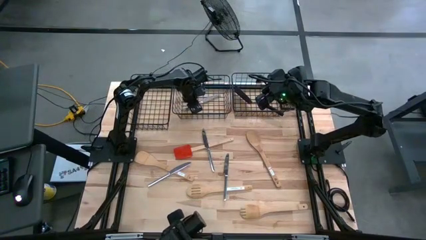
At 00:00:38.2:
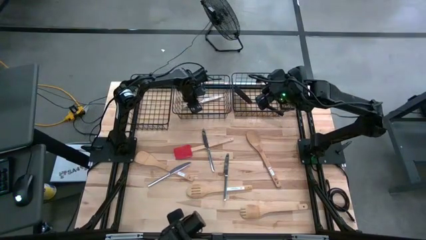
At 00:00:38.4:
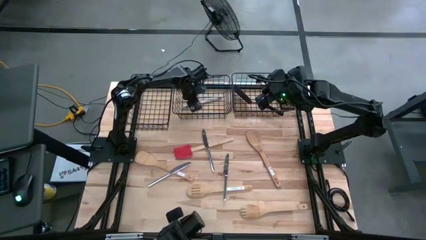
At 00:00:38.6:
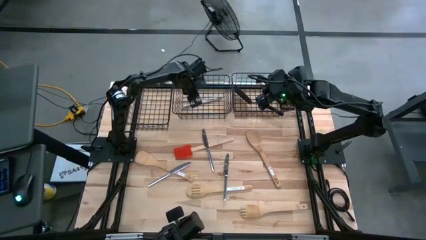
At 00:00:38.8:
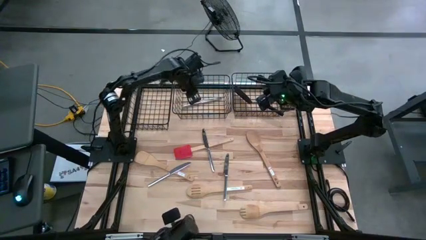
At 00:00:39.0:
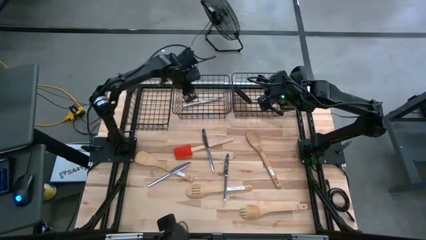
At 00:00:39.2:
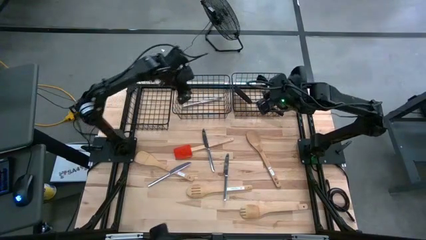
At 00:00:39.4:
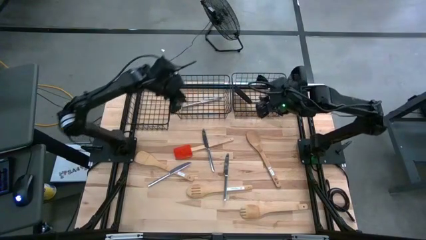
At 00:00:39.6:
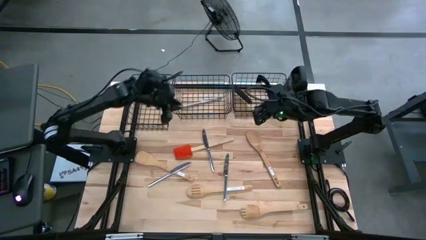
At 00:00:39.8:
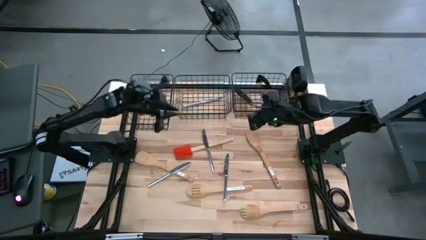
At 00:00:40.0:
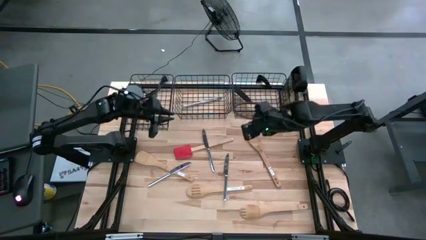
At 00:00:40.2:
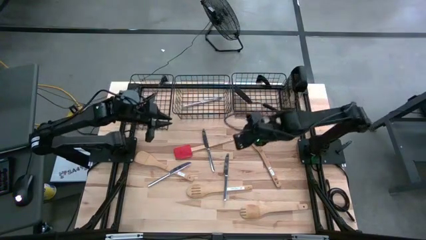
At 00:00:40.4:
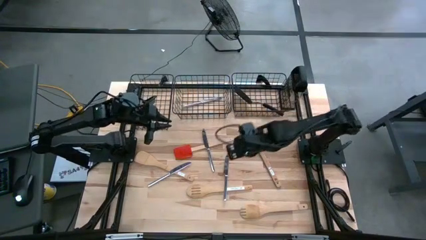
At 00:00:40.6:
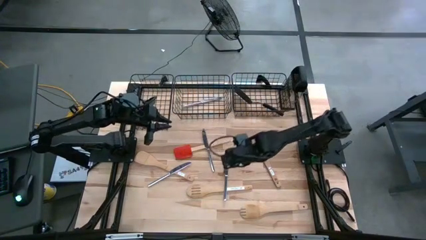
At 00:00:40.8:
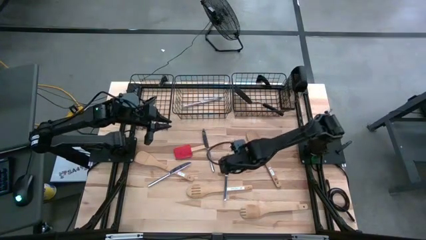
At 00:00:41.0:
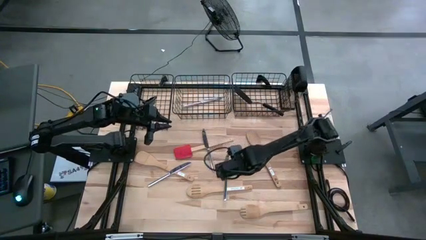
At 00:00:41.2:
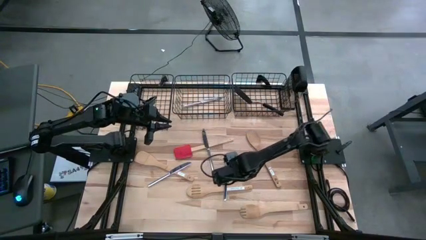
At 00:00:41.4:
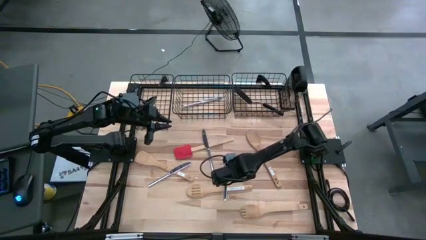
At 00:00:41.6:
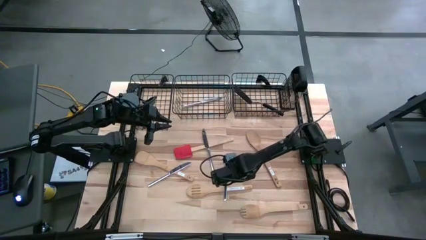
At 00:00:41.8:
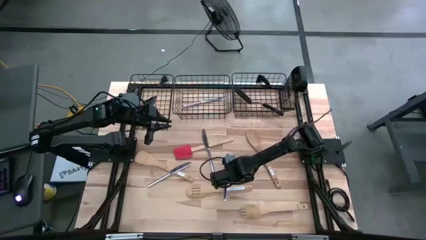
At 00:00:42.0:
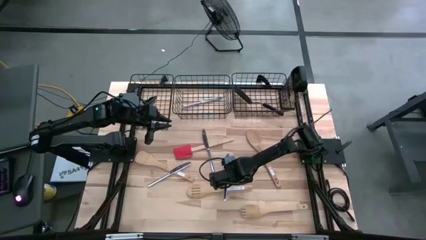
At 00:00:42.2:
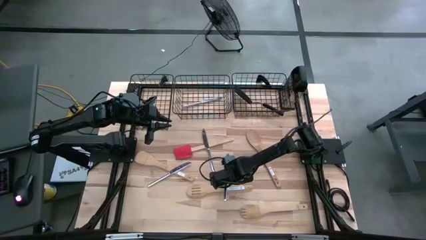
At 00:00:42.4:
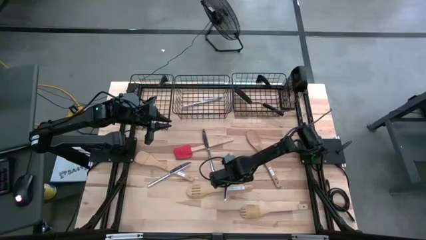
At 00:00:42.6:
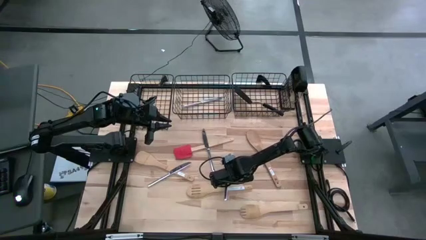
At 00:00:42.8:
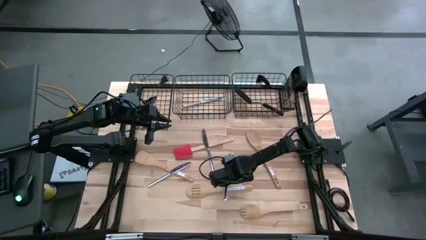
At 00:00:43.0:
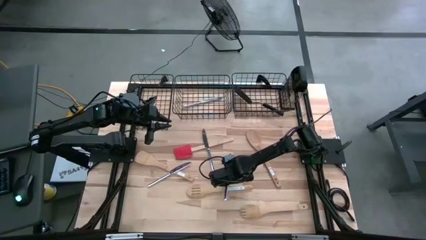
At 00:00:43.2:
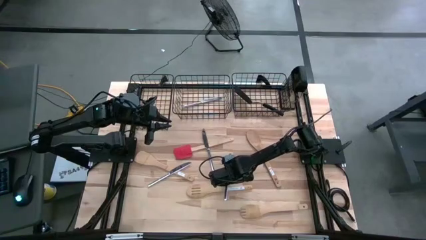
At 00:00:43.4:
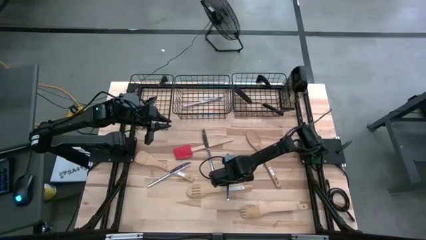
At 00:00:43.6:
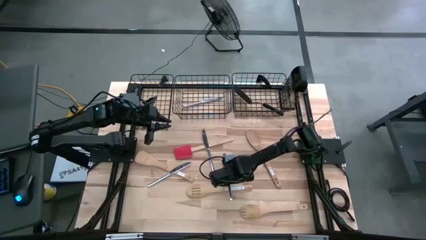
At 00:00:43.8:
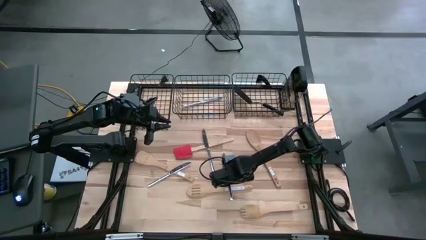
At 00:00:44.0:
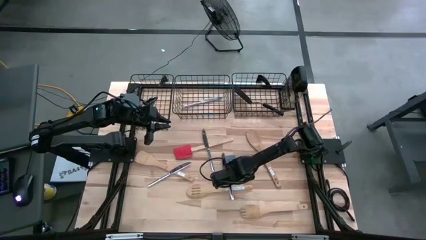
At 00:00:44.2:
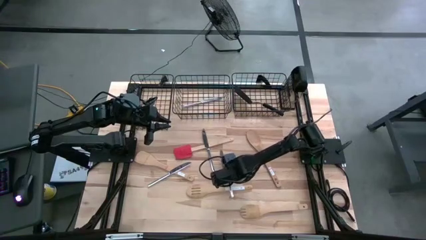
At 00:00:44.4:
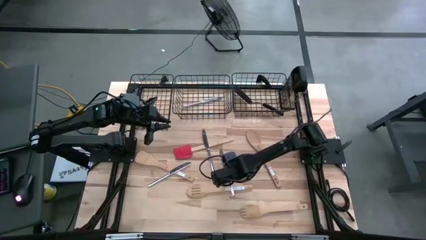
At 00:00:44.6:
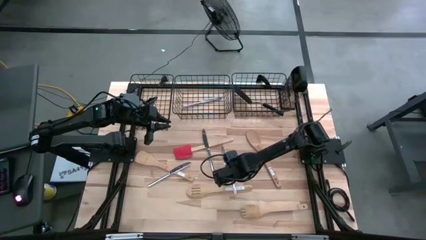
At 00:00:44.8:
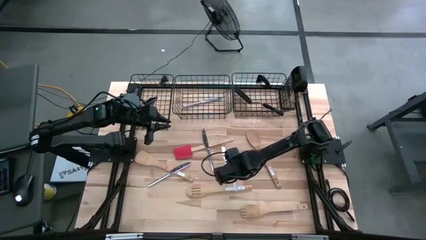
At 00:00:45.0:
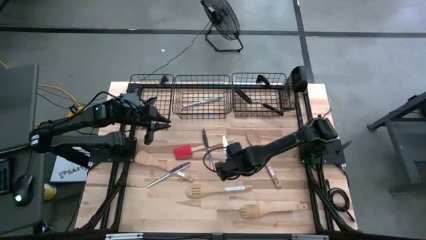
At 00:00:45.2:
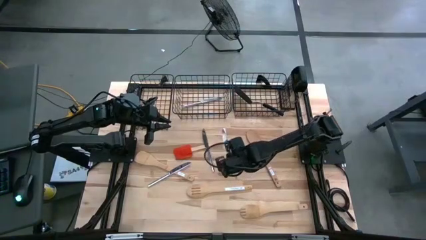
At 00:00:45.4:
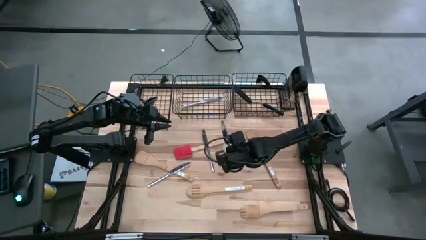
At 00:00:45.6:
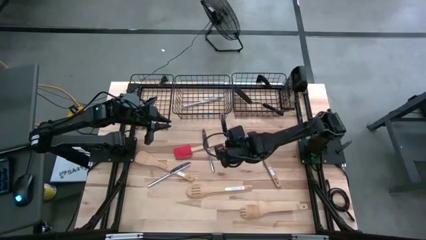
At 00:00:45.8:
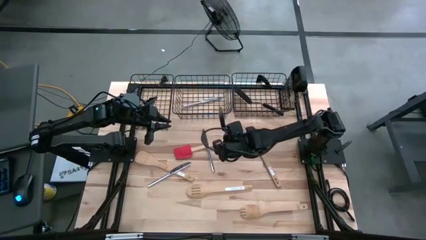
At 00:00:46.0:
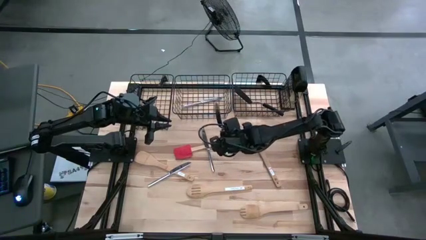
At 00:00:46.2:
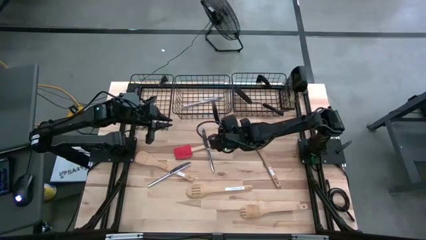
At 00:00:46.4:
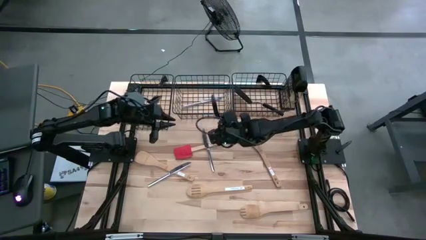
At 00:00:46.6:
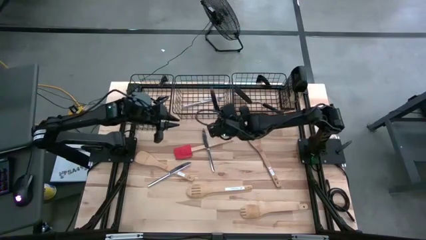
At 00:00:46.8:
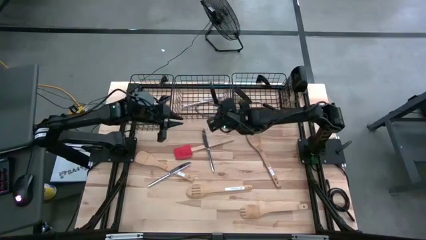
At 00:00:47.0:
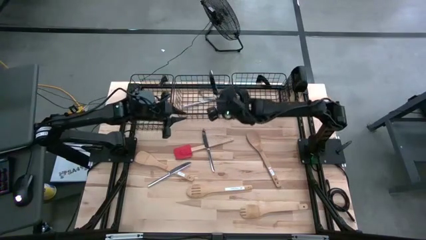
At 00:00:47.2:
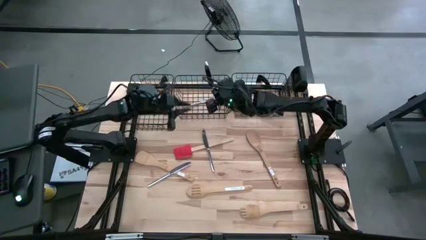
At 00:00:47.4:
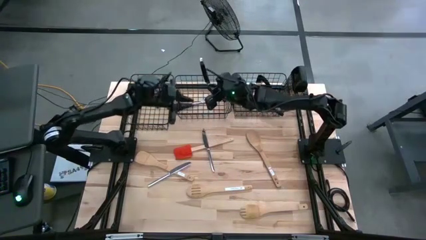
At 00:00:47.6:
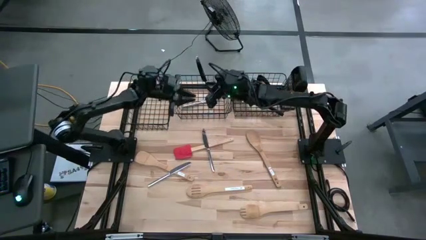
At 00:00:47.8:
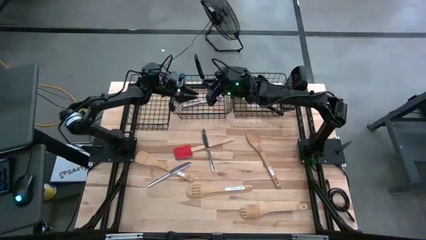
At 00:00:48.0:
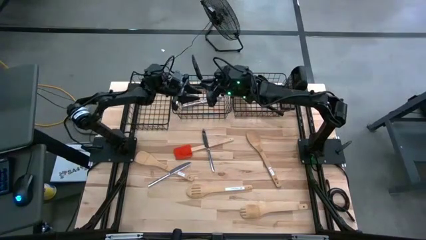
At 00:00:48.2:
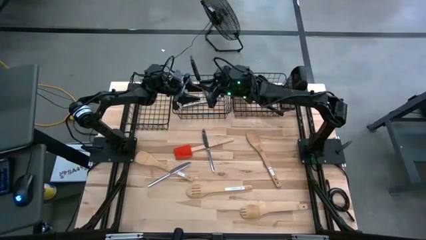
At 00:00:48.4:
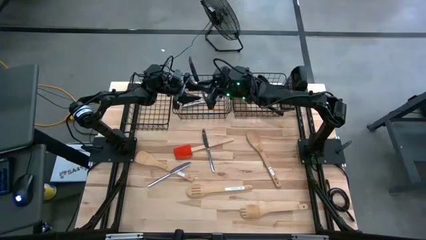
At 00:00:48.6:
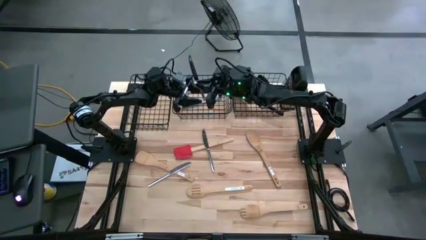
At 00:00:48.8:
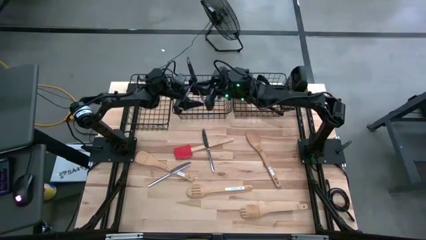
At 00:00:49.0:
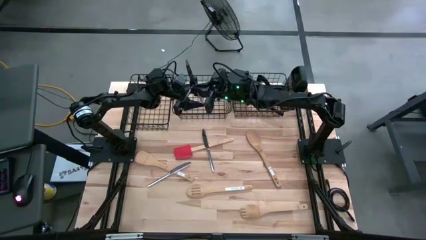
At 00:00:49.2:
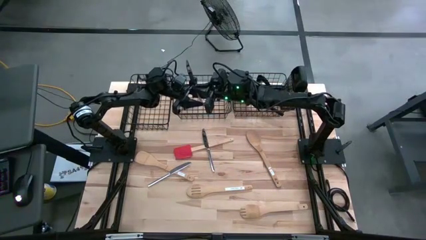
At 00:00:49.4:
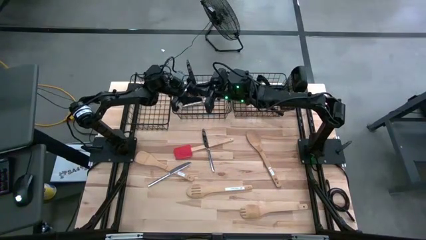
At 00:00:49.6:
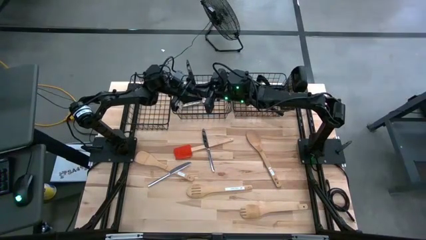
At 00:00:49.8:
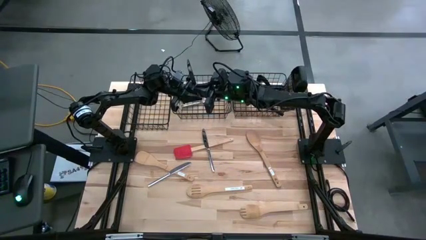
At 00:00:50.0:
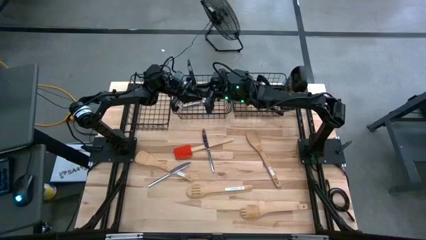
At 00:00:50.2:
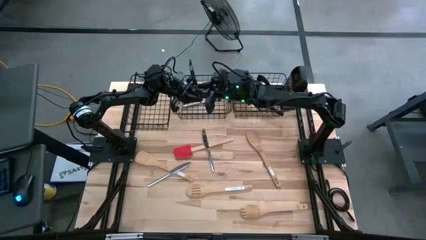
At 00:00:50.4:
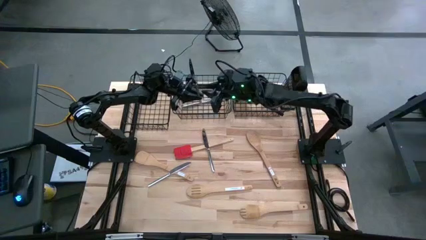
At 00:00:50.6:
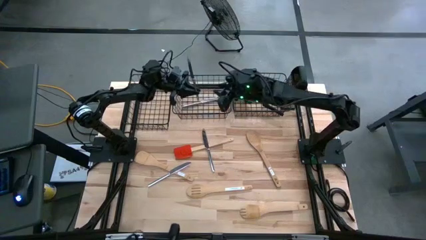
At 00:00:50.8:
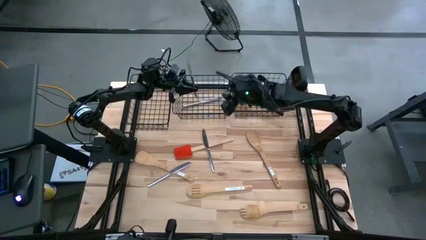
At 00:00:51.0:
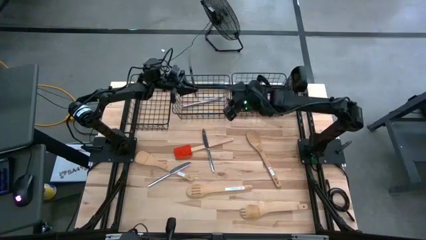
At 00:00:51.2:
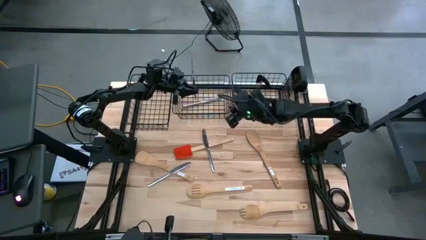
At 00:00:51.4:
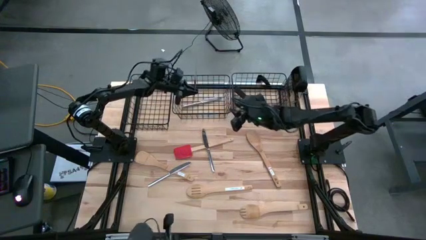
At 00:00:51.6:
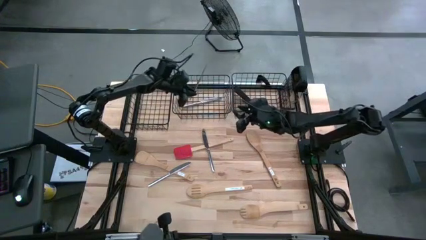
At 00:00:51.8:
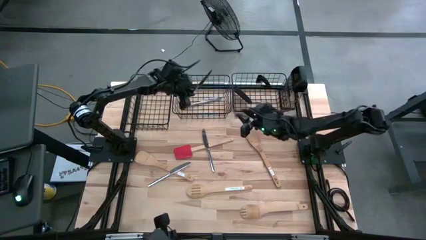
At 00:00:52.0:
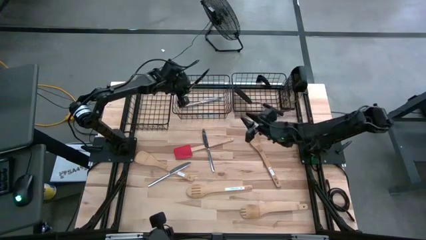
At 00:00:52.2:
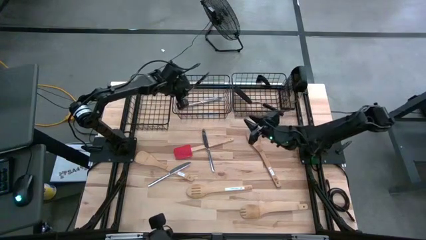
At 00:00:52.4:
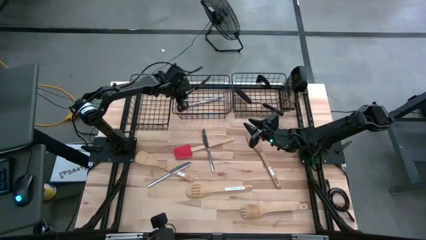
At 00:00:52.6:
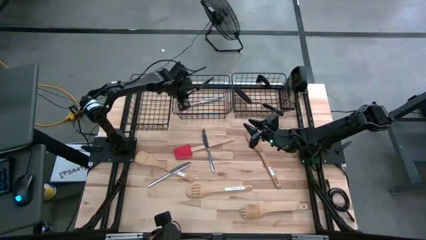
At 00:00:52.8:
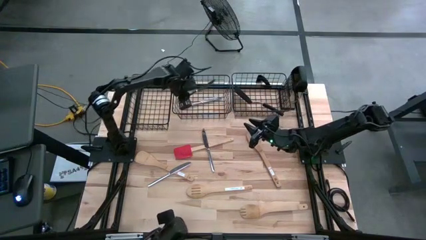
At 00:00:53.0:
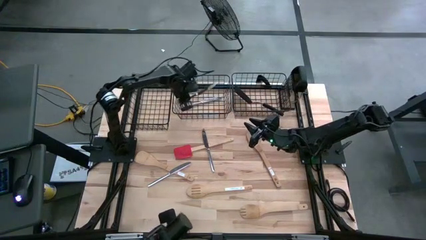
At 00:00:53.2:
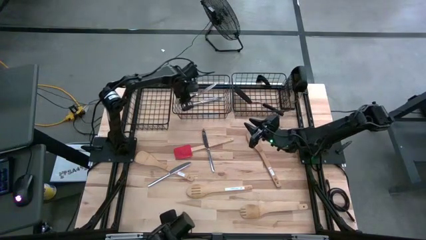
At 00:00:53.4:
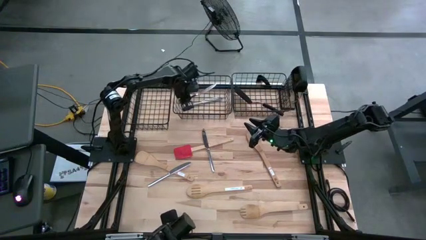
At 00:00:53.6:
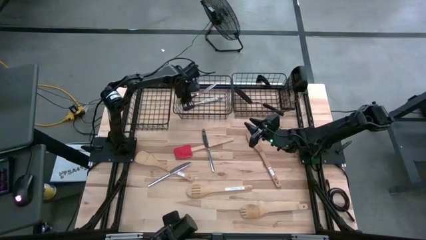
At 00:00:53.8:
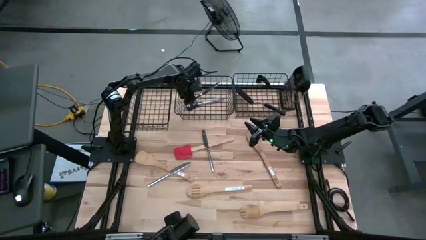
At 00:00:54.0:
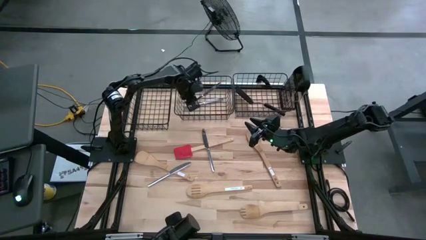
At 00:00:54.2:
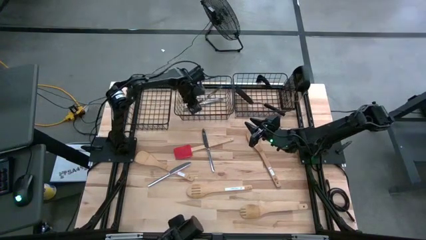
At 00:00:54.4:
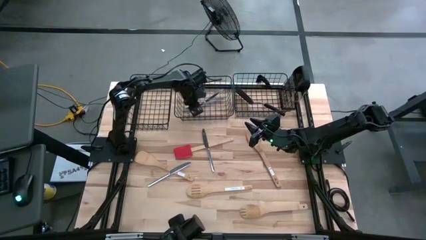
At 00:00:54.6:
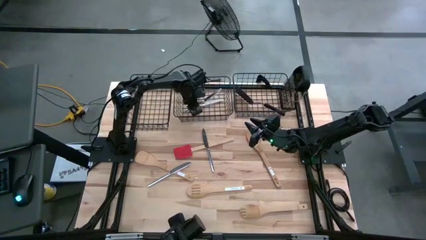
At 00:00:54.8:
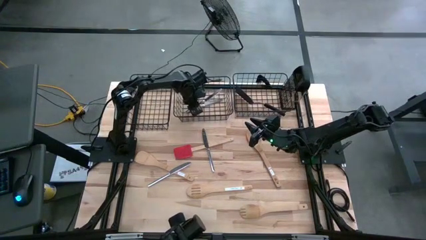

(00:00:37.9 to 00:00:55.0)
Task: Pick & Place Kitchen Items
Put the table knife into the middle wire basket
